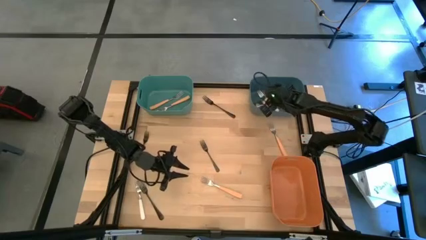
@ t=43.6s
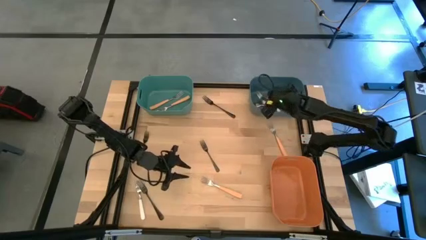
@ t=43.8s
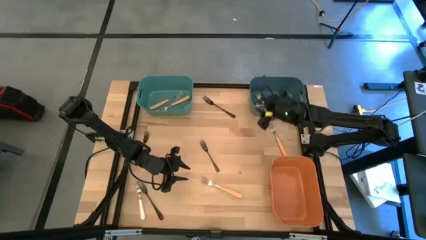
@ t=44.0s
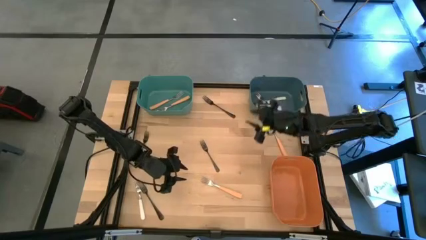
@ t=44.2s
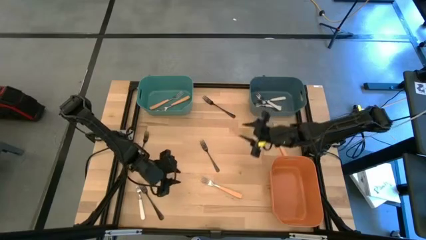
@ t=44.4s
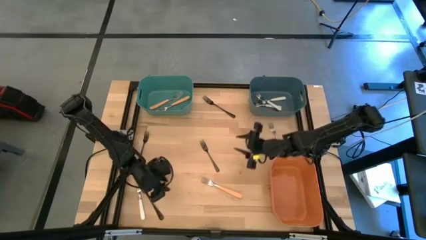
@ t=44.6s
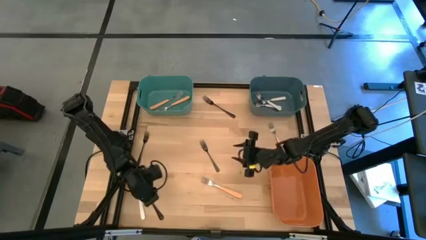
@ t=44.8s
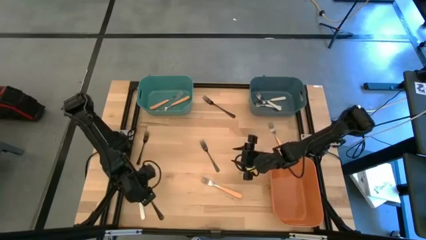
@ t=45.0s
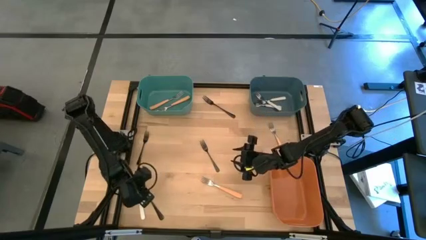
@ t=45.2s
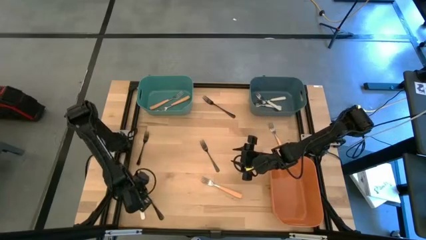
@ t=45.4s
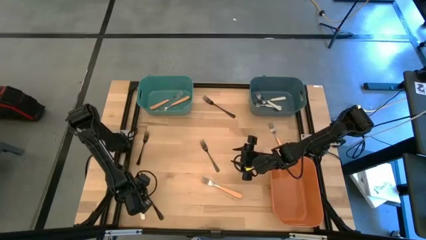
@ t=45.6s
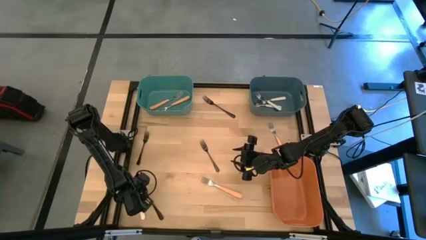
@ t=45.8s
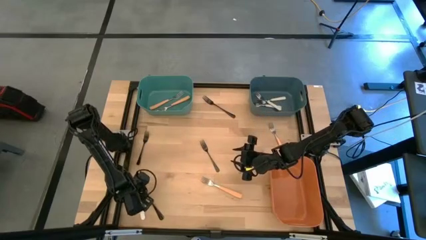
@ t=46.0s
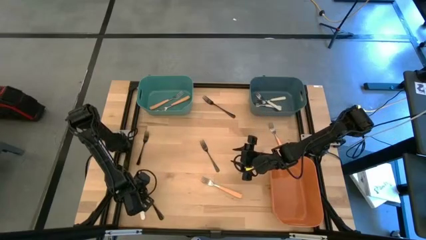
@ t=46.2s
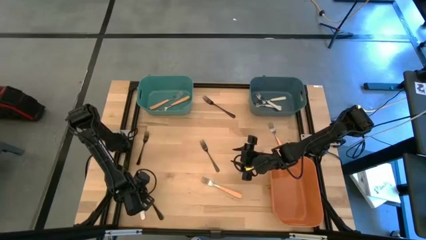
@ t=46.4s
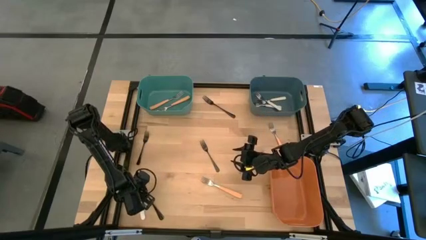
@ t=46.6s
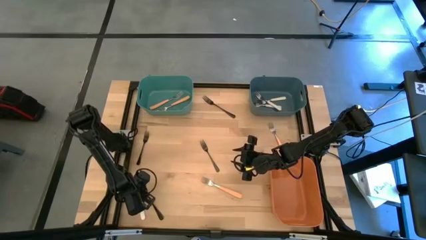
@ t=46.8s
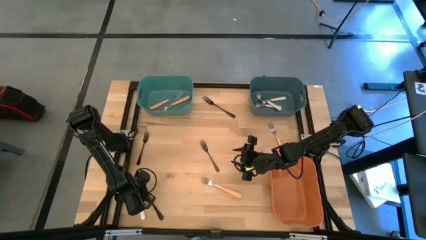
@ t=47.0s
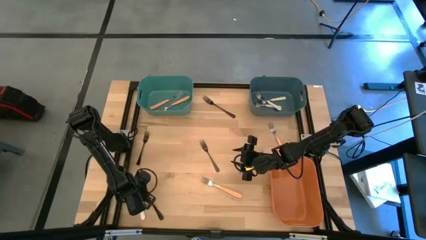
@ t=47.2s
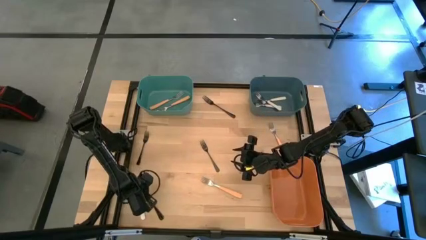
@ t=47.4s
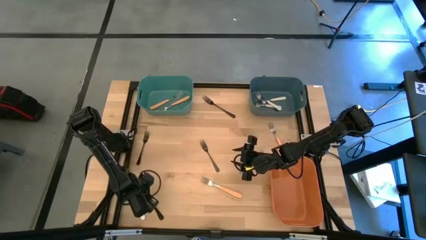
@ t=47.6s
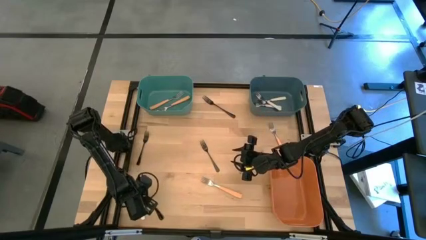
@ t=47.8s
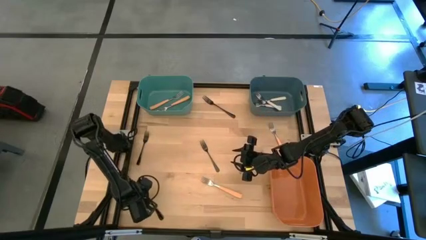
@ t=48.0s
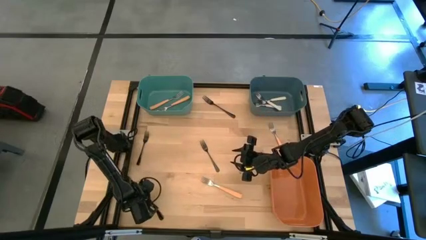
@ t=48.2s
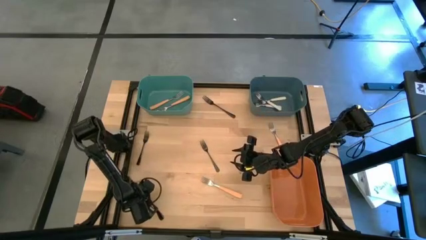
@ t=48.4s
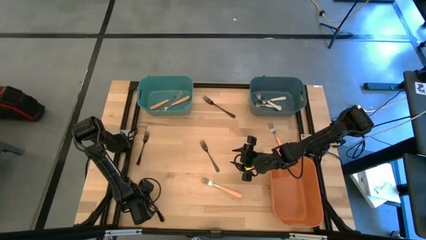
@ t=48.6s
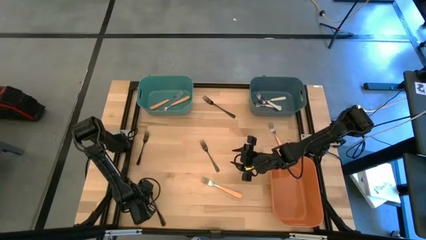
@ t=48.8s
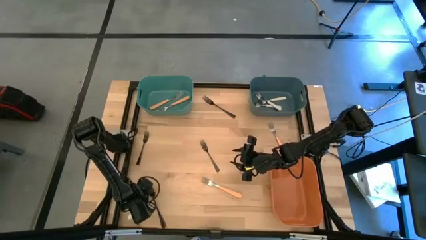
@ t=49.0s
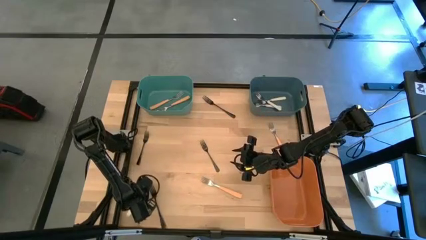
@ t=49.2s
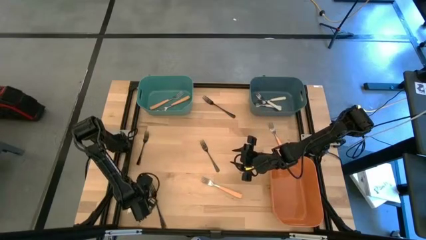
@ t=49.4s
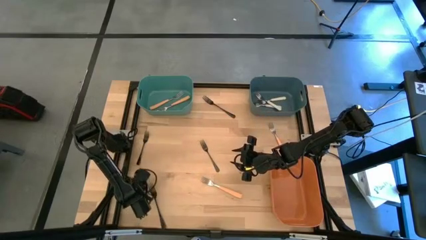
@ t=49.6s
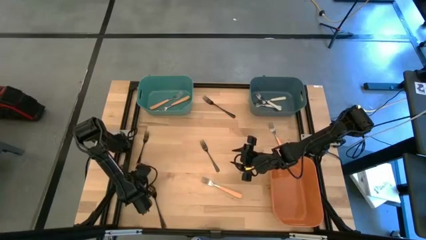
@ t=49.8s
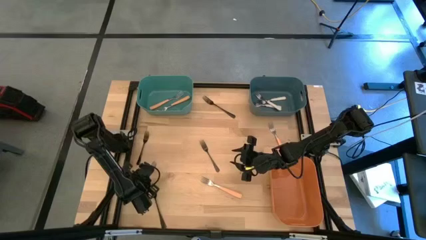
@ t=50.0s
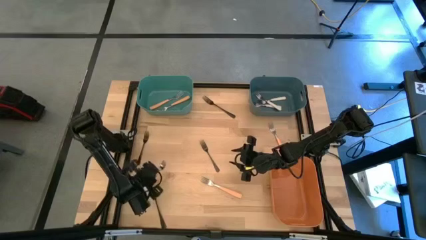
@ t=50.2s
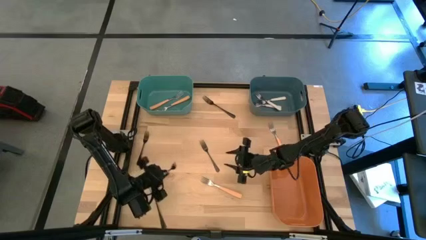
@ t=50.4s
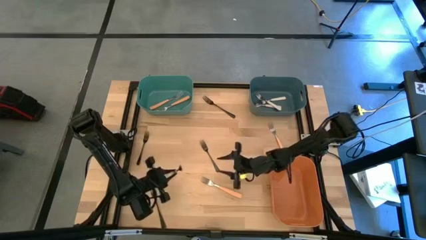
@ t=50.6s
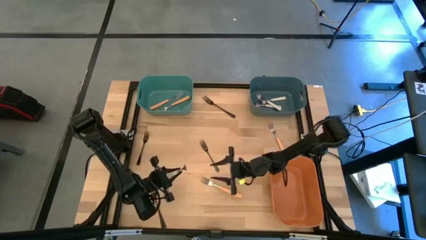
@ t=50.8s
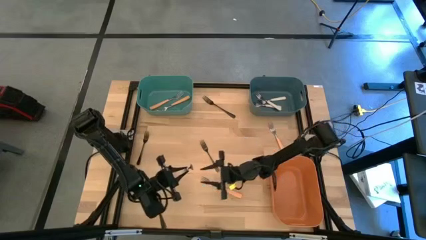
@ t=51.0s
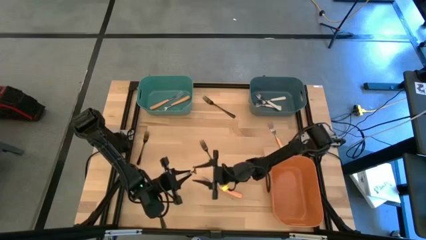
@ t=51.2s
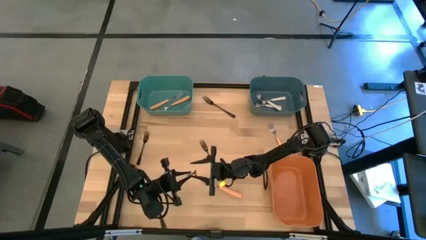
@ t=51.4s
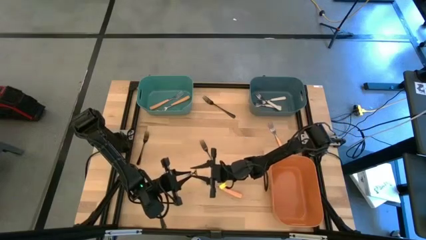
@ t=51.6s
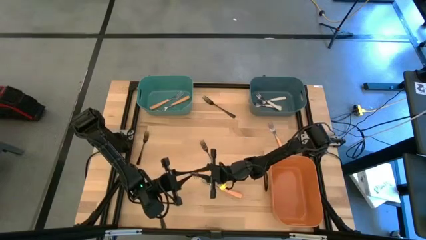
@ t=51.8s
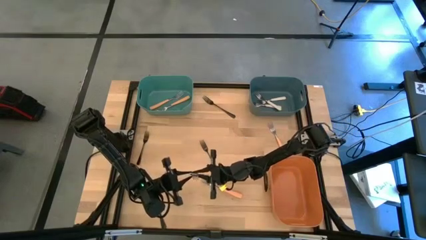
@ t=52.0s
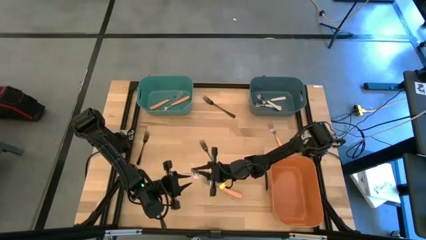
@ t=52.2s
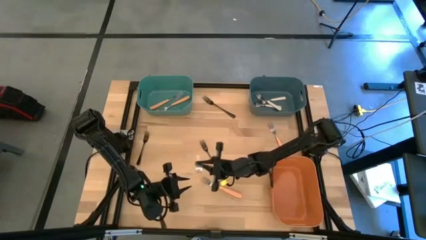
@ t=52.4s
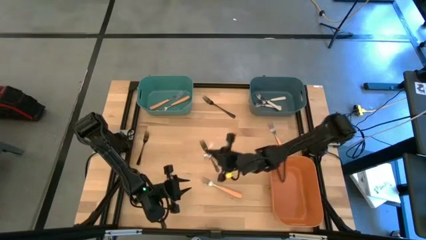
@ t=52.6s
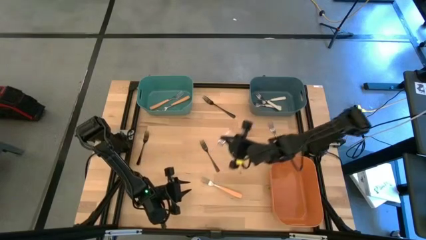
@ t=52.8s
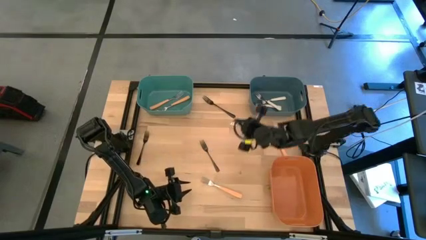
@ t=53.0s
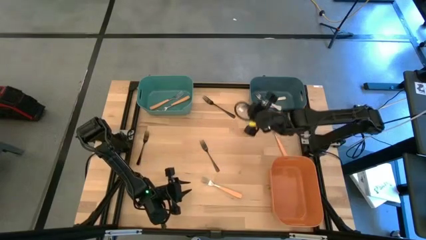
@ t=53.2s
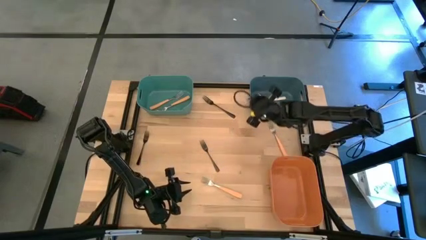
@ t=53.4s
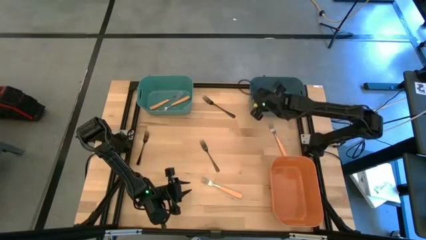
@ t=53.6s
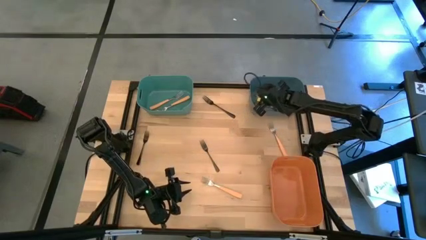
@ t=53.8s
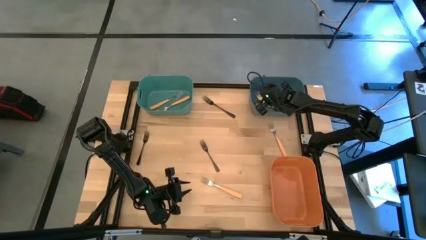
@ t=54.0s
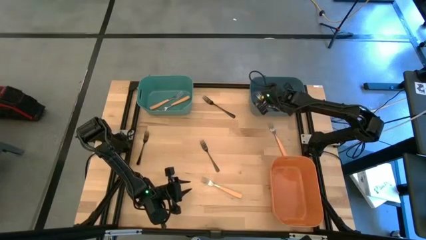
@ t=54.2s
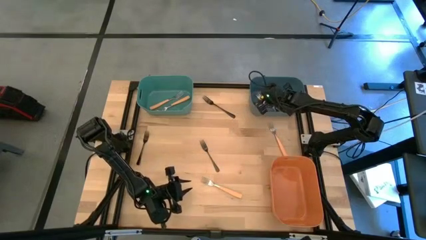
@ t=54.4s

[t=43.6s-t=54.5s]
Task: Sort silverware by color (type)
Put the white fork into the blue bin
